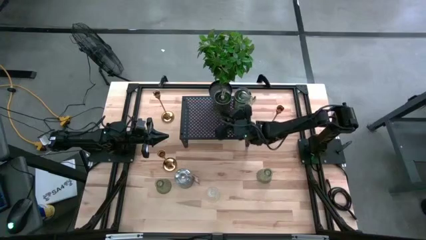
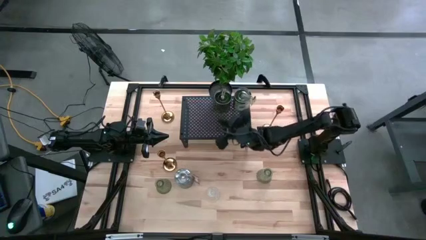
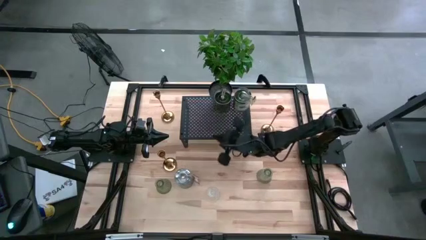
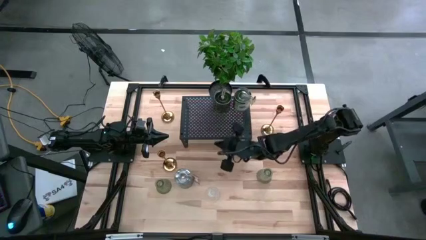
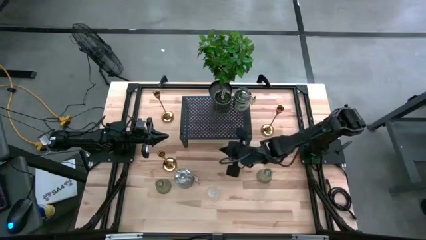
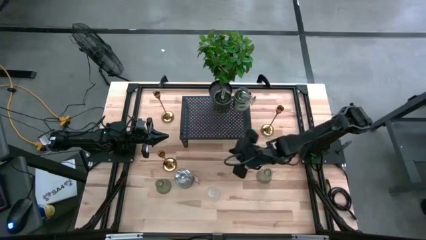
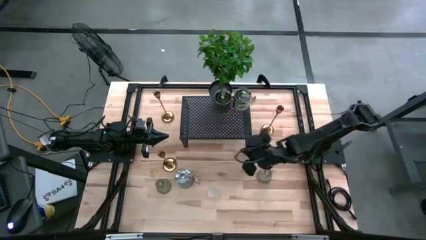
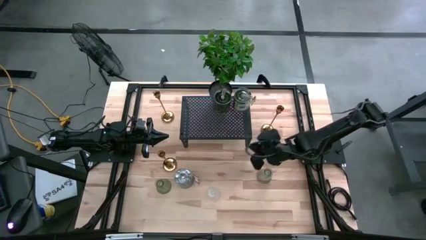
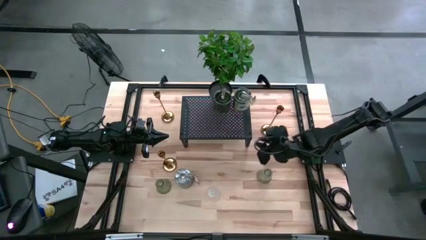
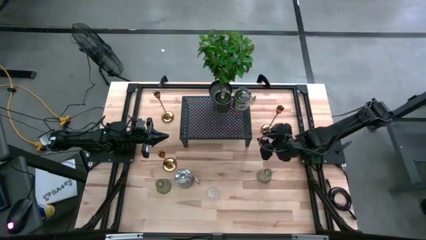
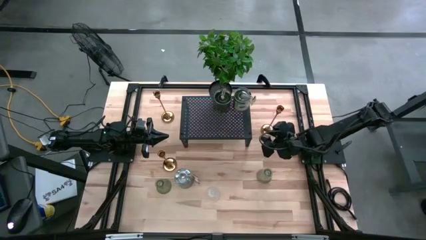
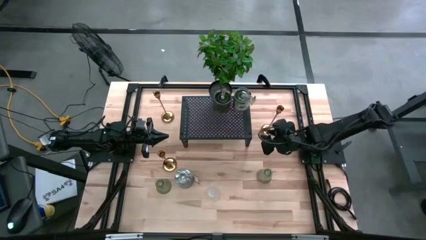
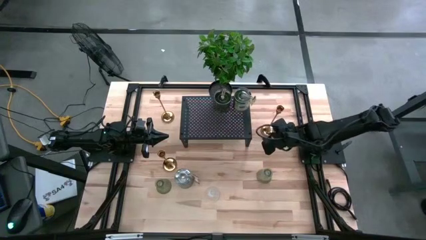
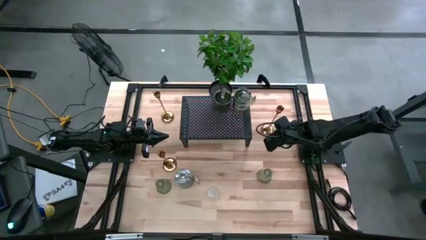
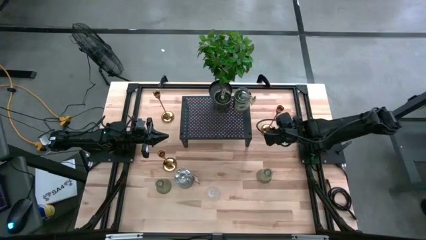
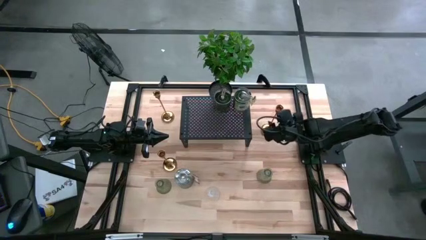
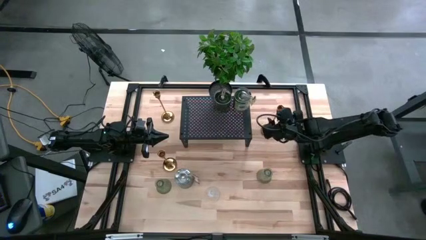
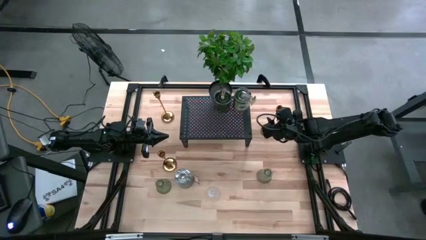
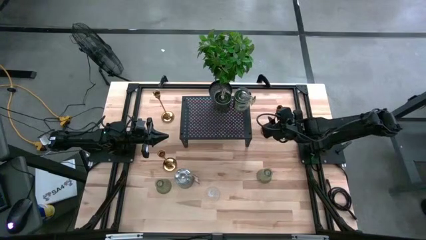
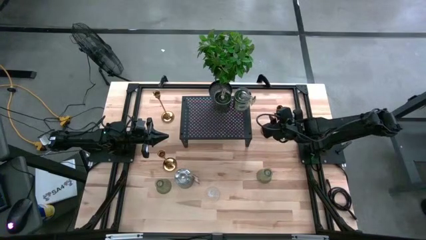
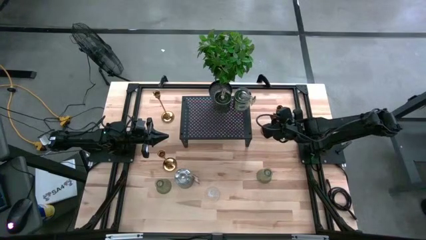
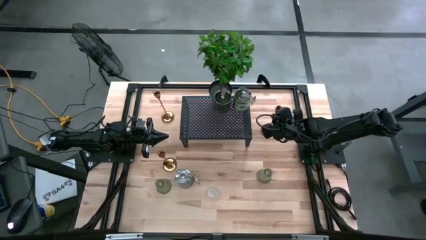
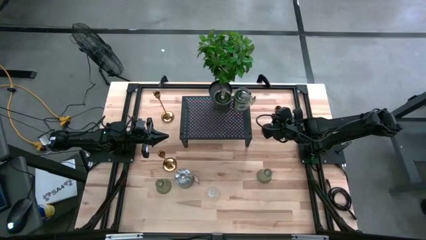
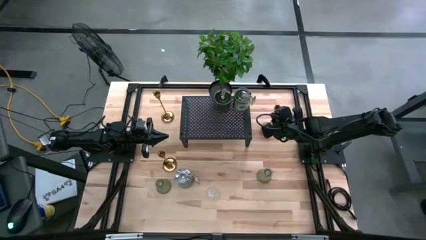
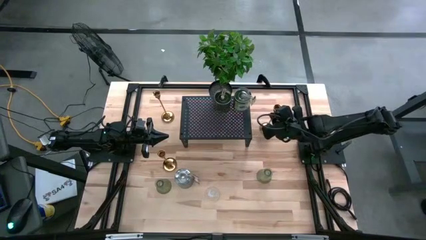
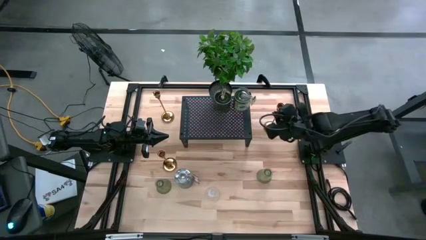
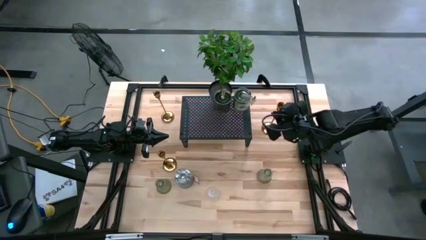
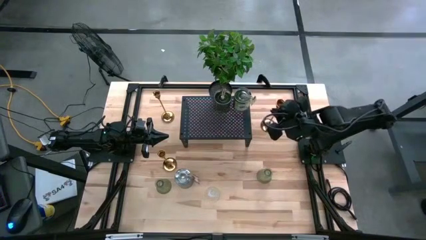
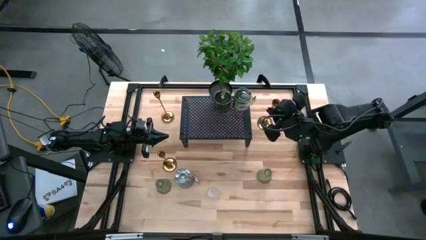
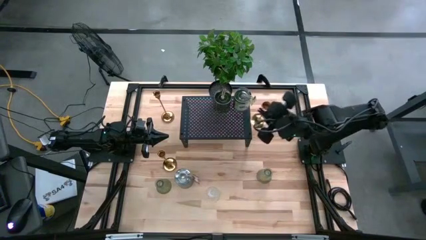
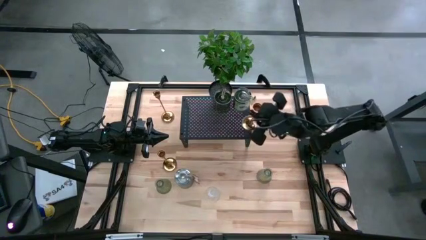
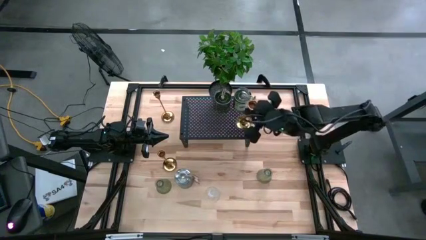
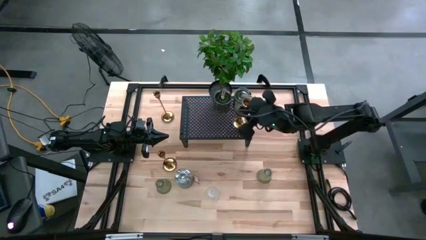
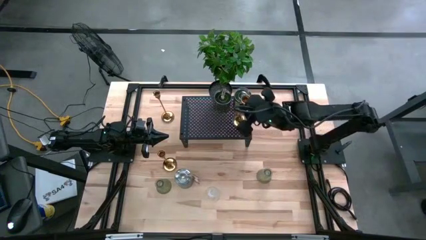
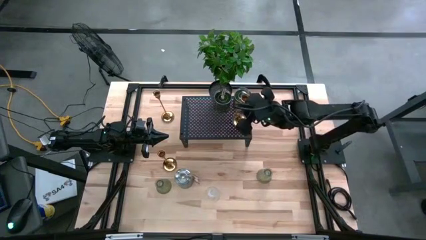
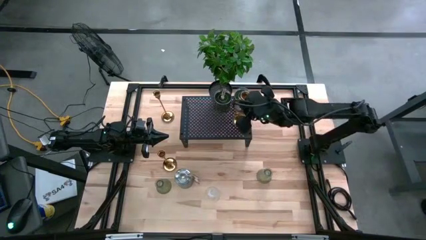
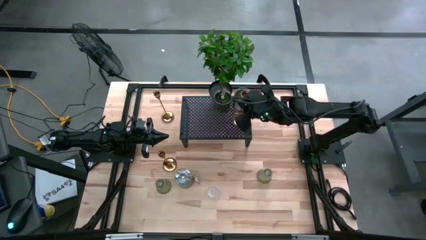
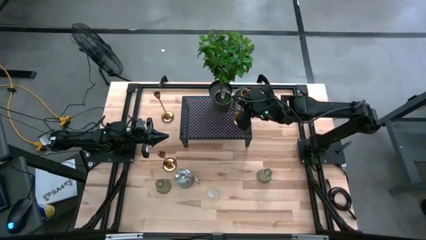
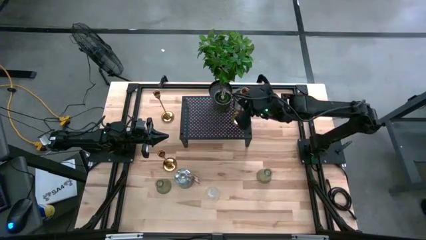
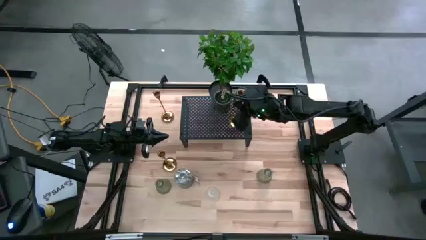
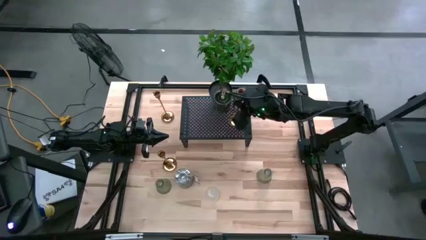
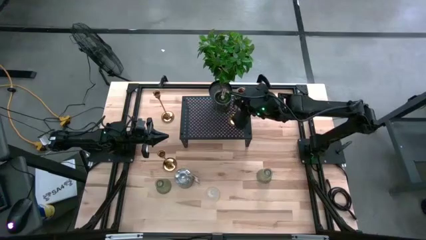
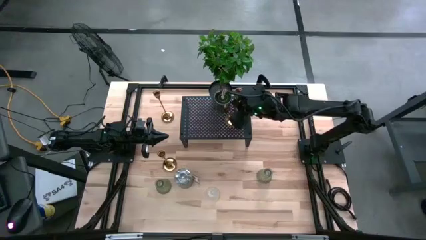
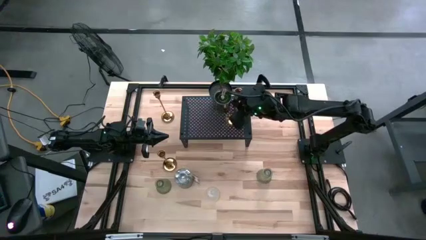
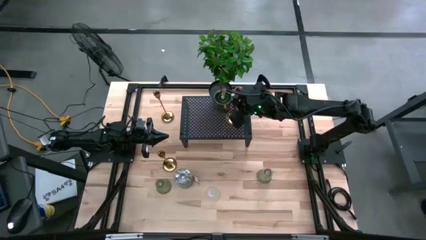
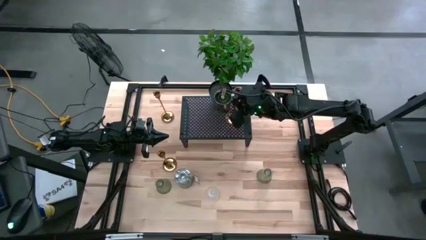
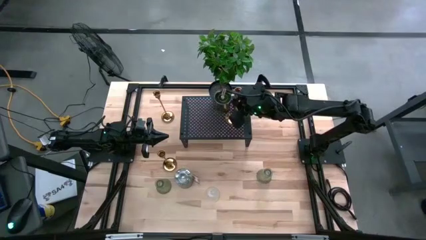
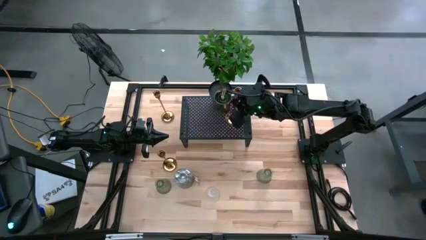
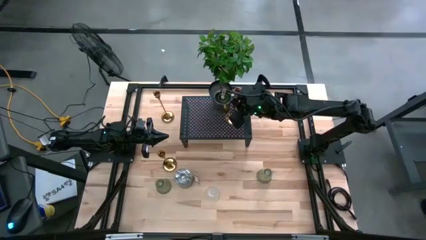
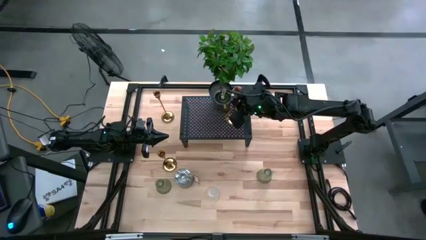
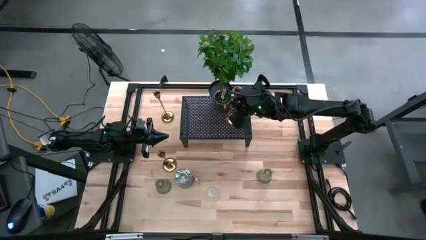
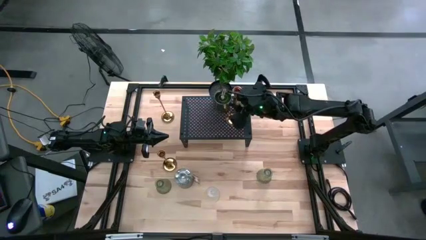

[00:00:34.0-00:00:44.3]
Task: Pick & Place candle stick holders
Put the right gold candle holder on the shelf

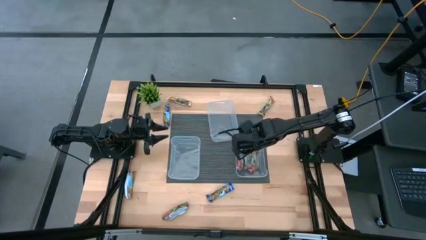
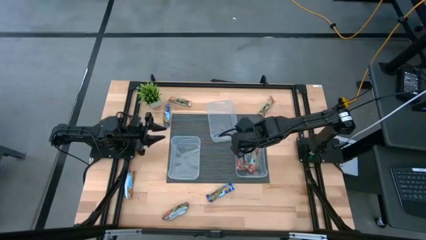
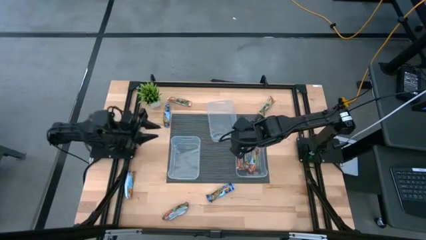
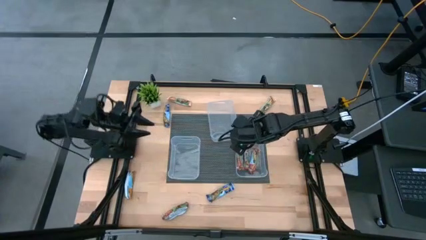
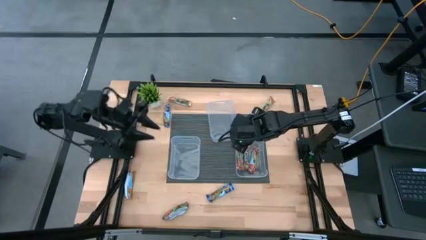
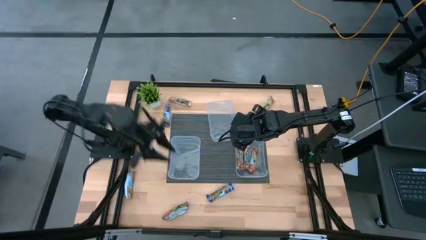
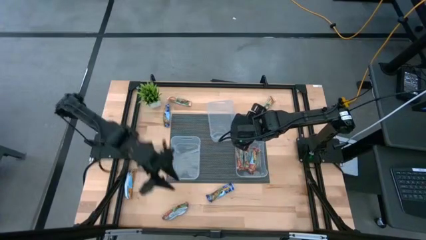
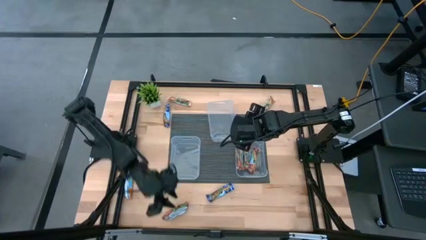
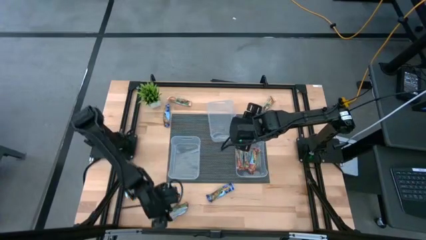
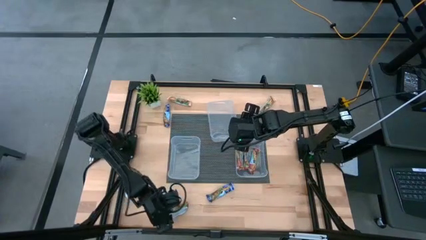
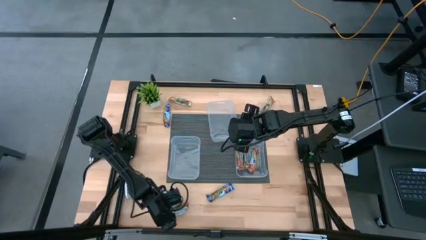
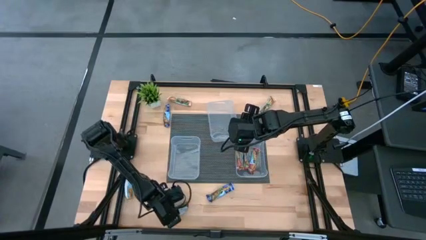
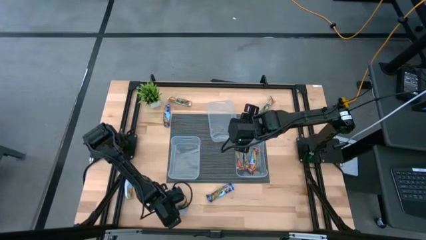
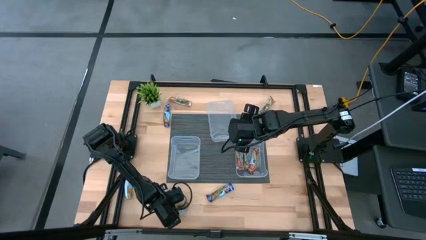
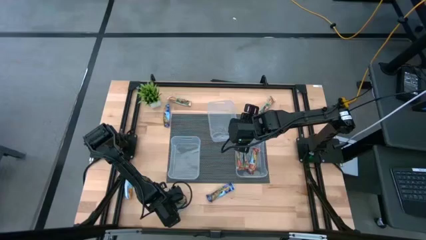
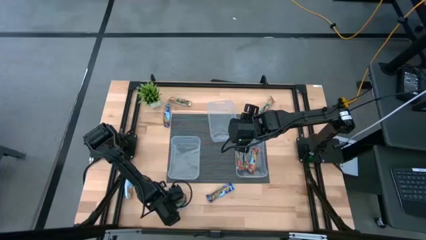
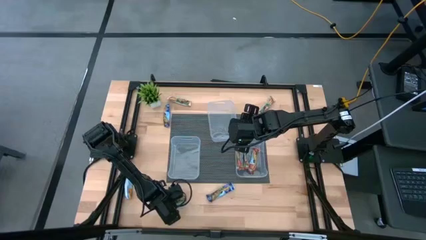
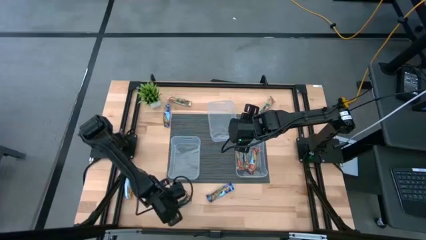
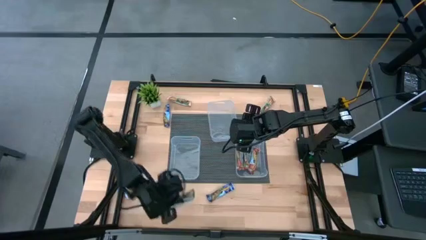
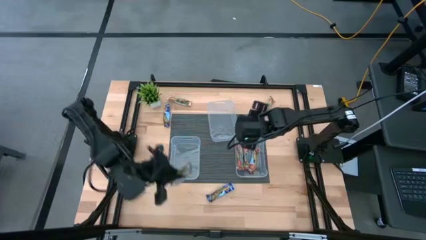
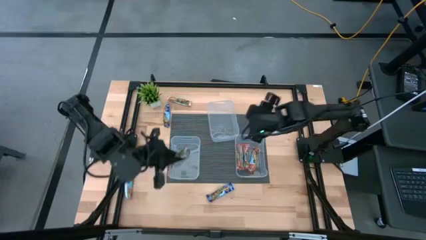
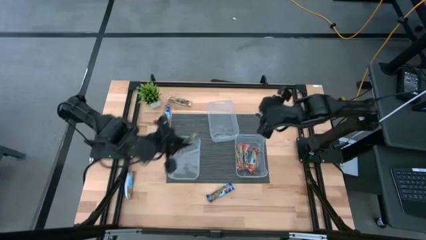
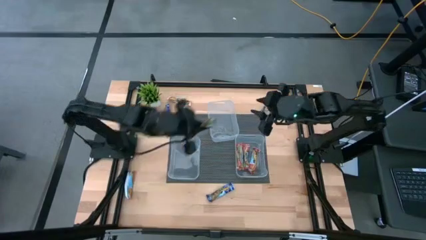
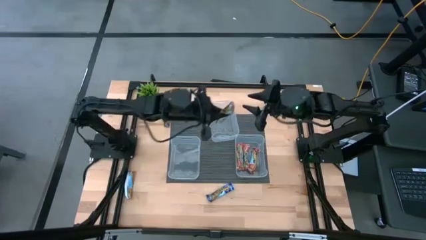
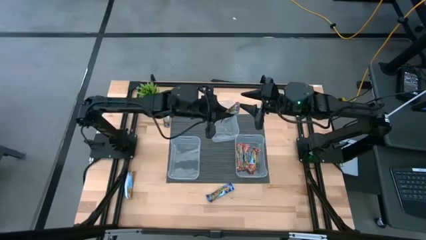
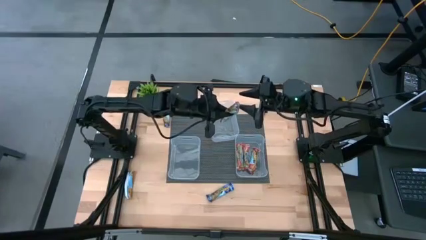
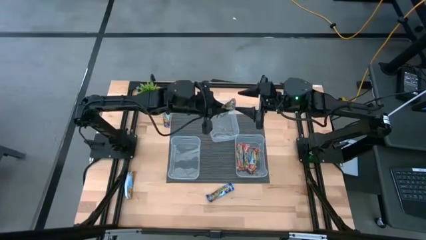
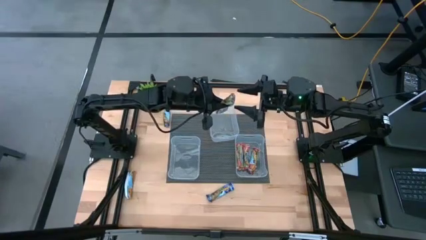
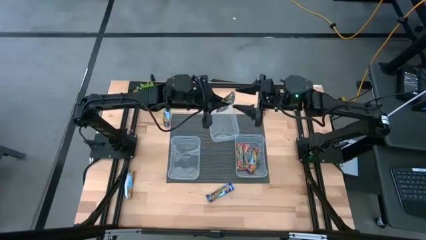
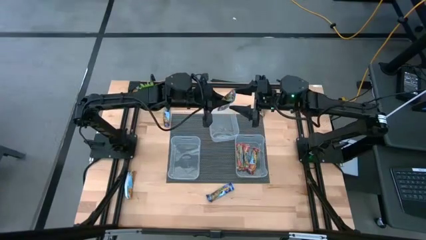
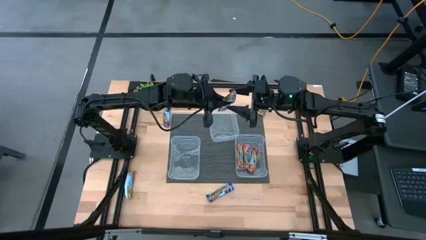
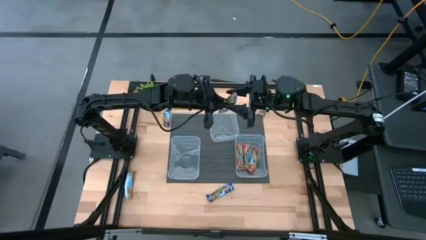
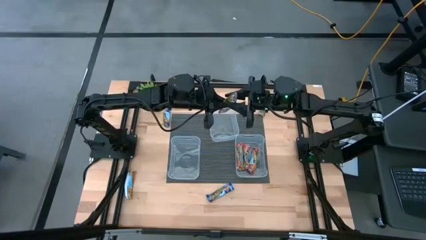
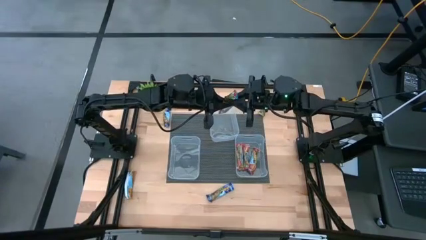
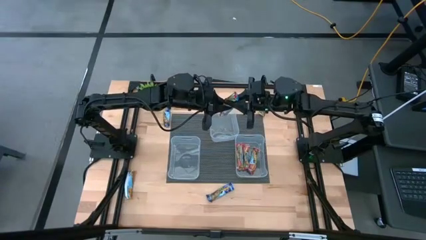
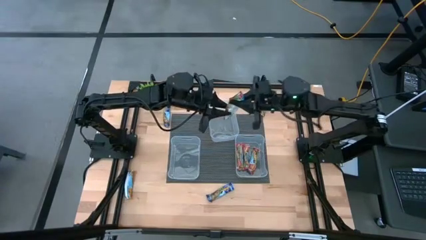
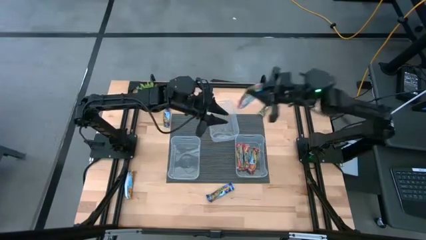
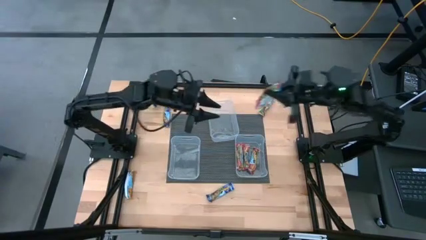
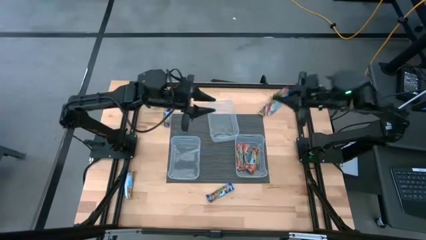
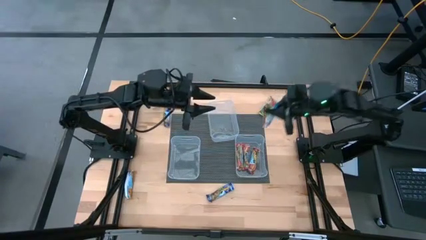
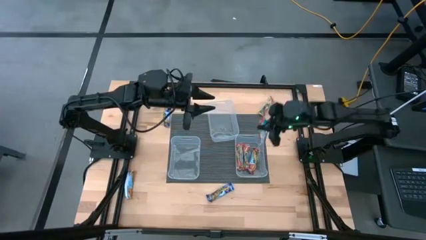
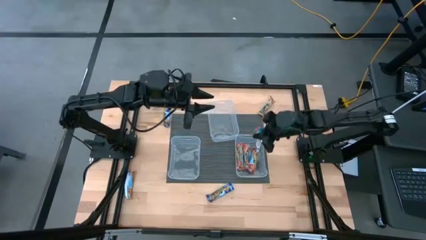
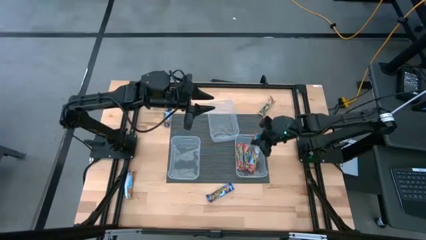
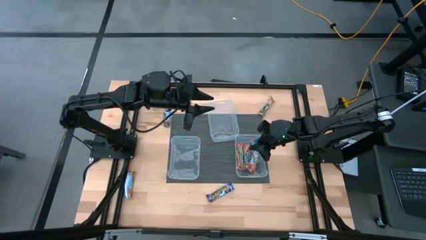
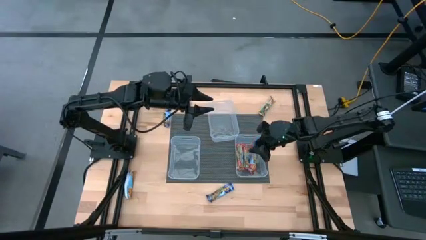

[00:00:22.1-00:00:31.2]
Task: Pick and place Granola Bars by type
Put the red granola bar into the bottom right transparent bin
